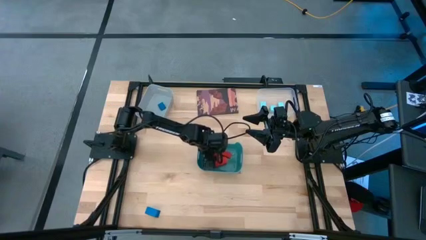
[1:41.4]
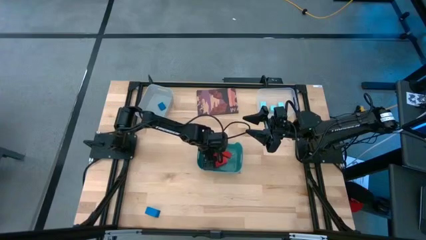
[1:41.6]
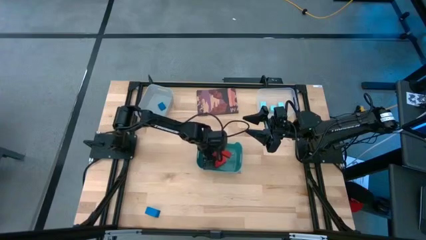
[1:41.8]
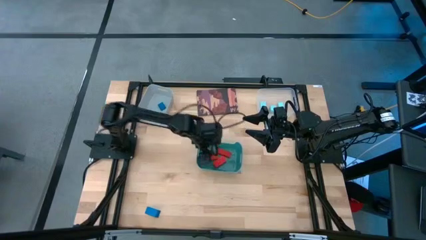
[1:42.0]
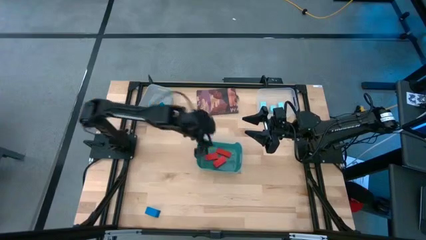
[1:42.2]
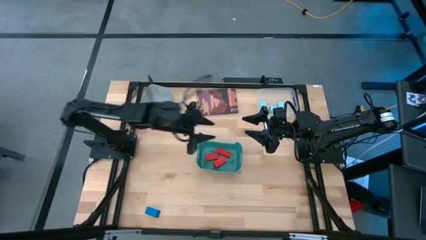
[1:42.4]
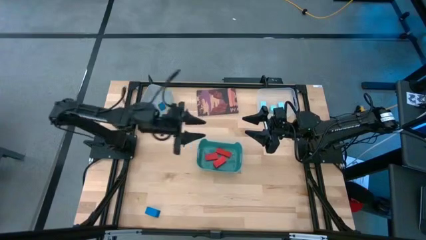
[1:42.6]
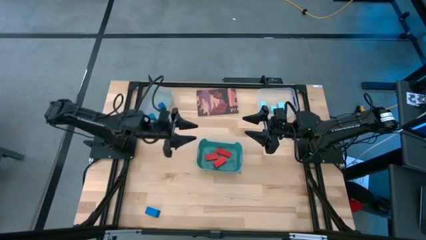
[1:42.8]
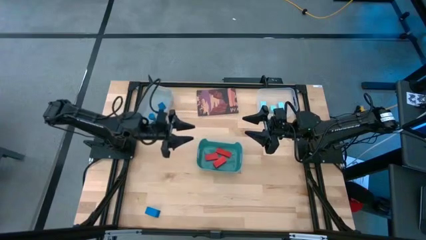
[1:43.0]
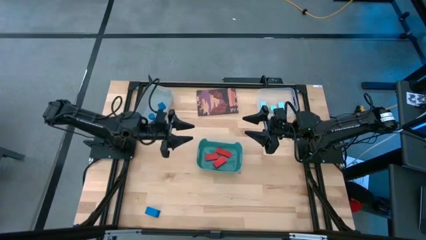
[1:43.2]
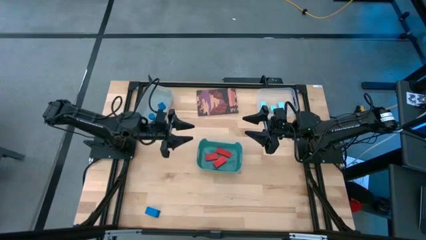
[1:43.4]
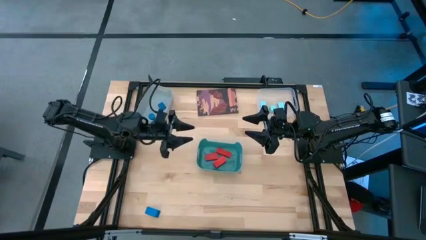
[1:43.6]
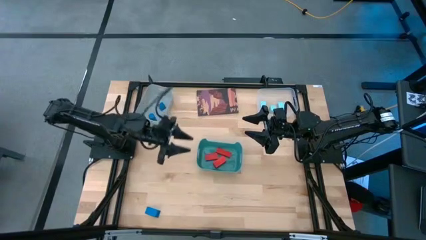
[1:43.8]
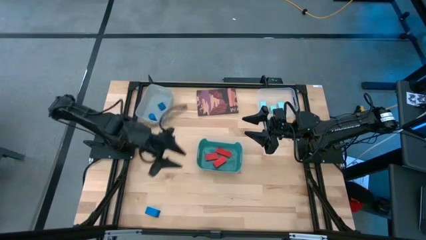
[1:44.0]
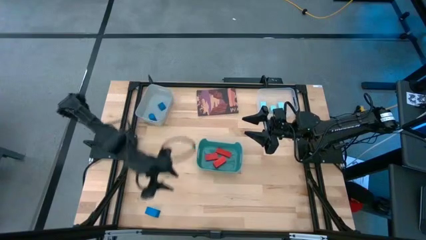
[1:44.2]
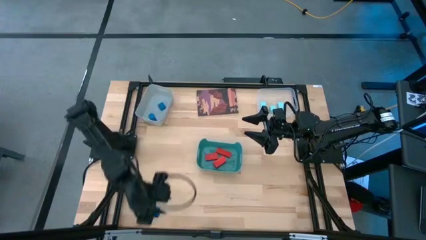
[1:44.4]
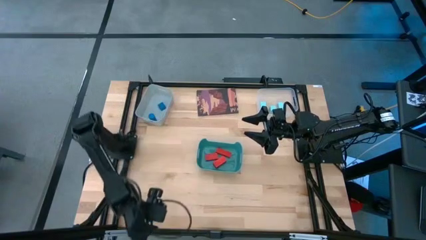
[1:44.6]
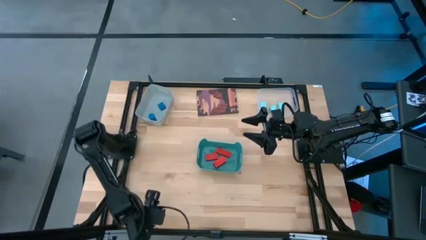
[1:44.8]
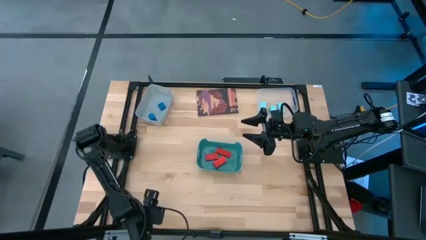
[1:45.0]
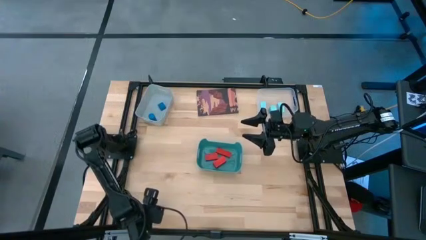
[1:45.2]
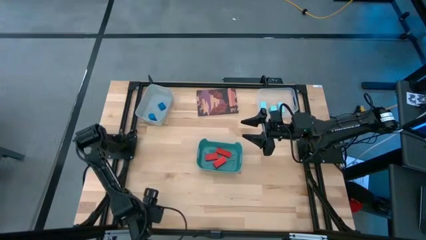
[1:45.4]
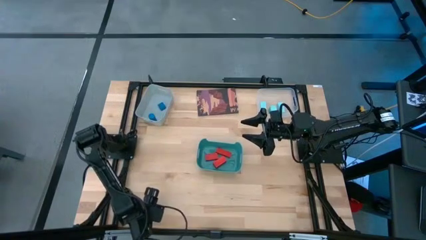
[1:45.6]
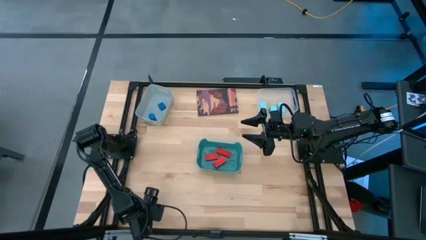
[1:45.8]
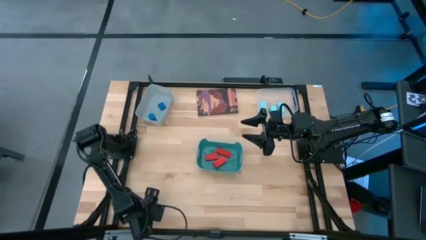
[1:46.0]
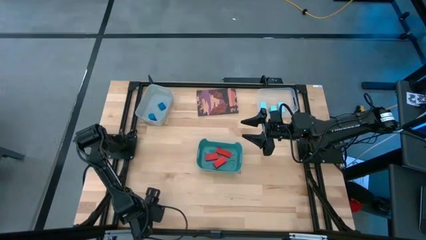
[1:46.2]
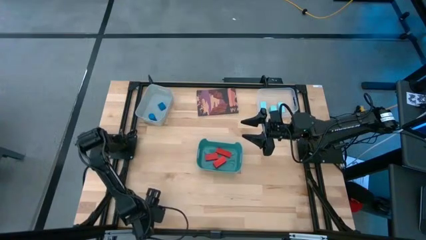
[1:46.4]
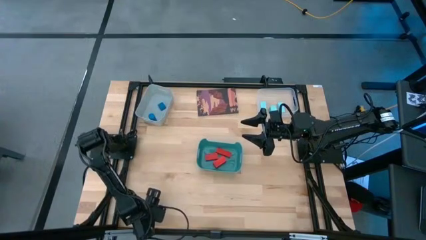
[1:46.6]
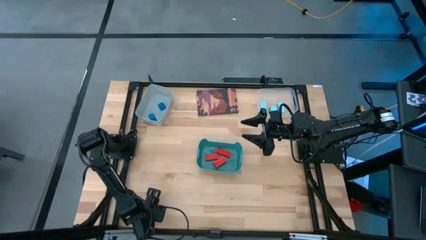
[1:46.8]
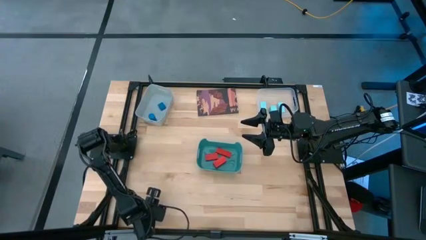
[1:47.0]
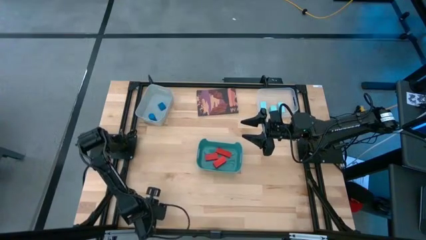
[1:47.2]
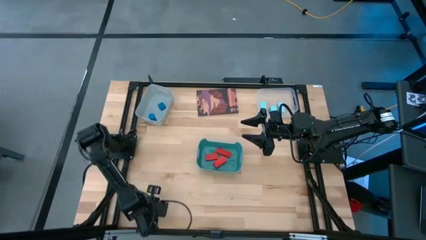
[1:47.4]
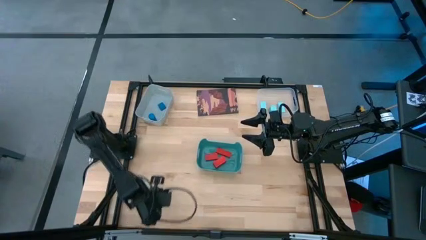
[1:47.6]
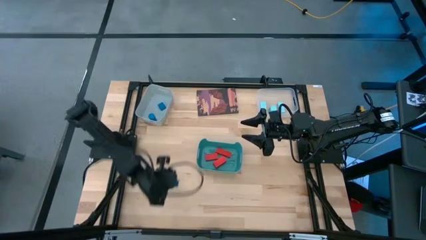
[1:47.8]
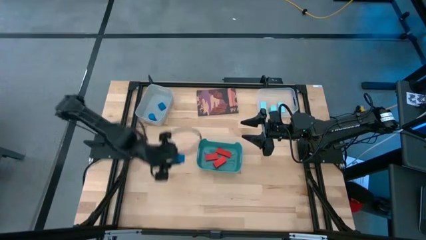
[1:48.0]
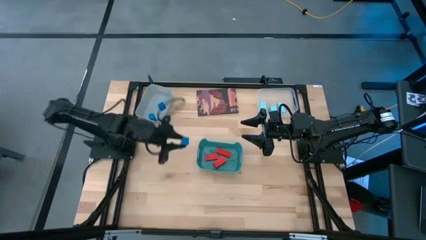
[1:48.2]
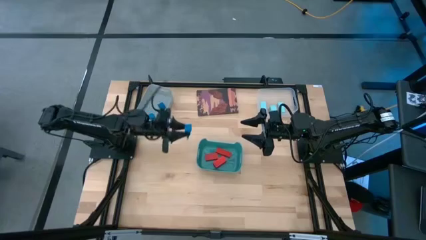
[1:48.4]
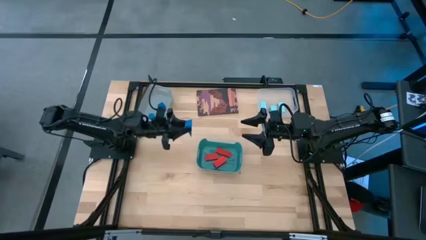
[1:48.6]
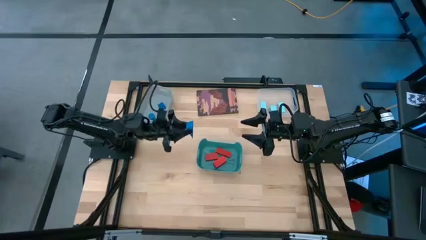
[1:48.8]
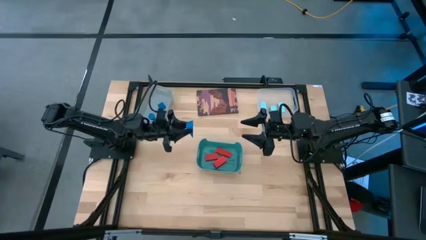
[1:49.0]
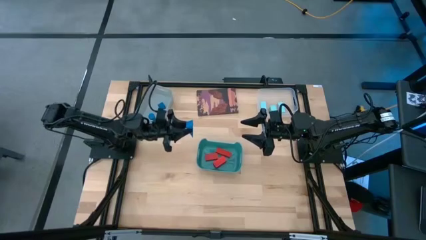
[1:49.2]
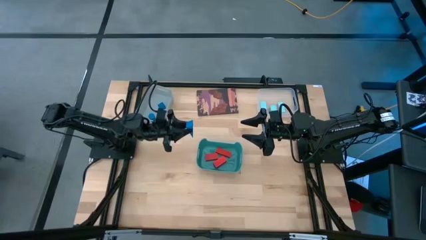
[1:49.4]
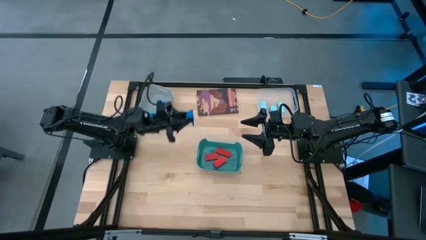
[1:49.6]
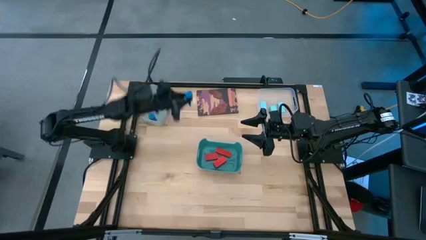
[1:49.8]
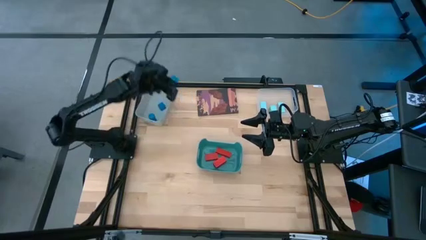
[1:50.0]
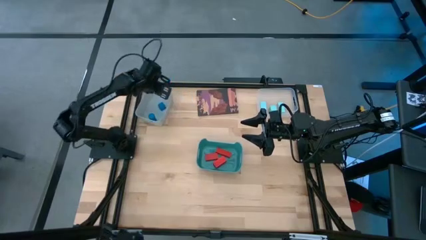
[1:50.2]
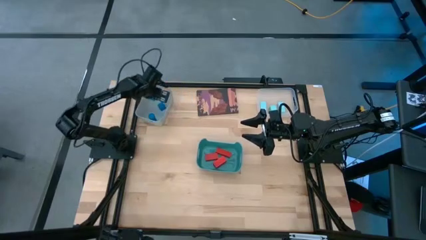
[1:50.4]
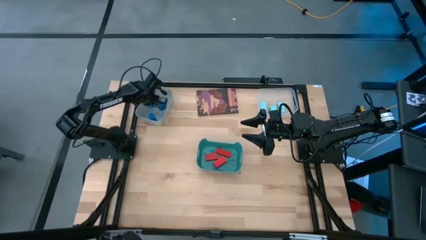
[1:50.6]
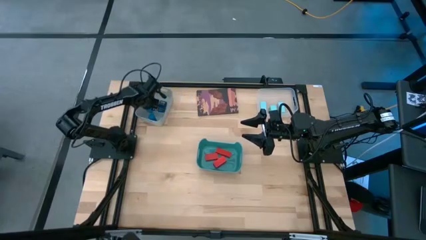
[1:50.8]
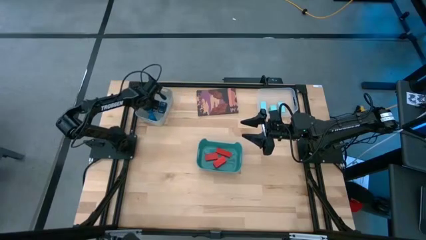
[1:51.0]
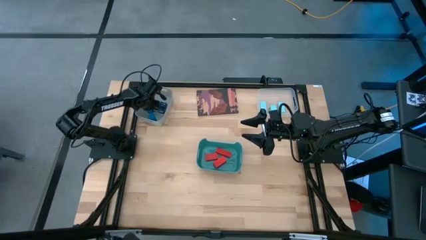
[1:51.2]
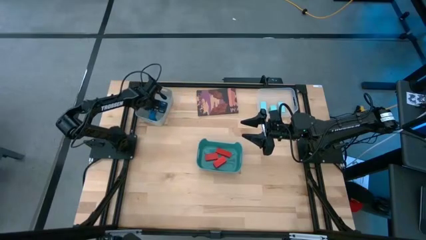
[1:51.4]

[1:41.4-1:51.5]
Task: Sort & place blocks by color
Put the triangular blue block into the white bin

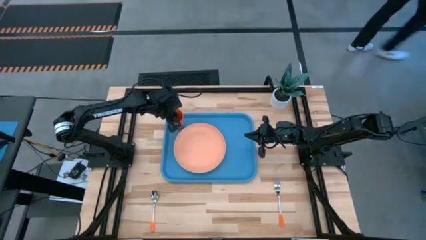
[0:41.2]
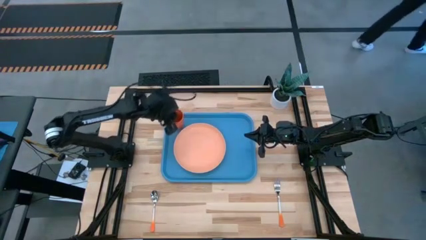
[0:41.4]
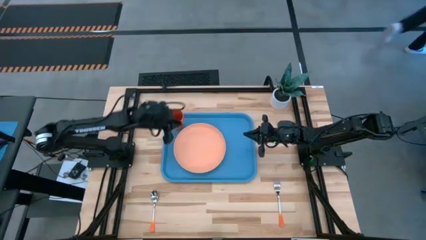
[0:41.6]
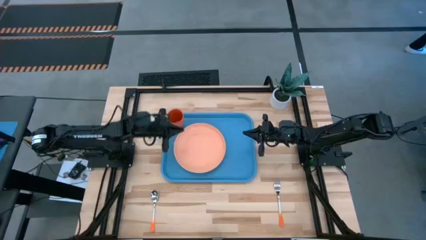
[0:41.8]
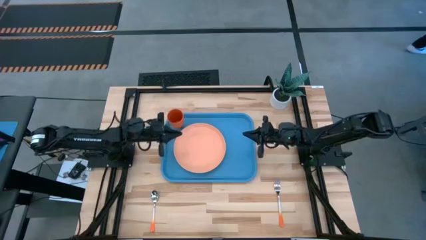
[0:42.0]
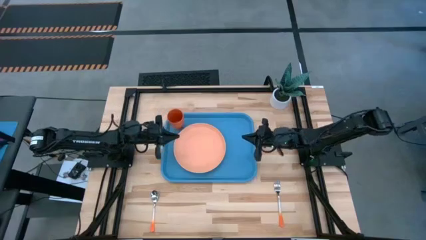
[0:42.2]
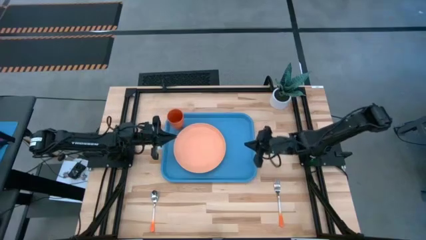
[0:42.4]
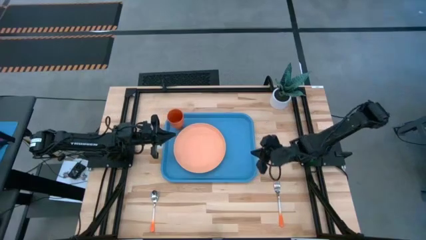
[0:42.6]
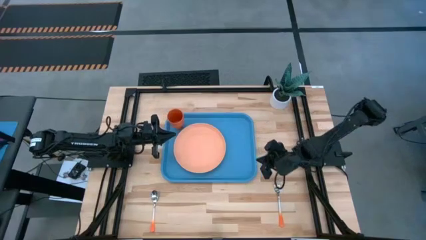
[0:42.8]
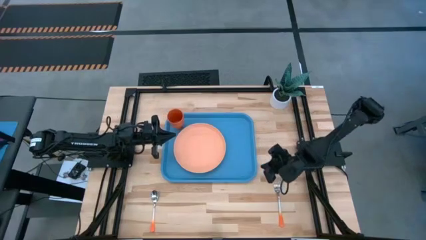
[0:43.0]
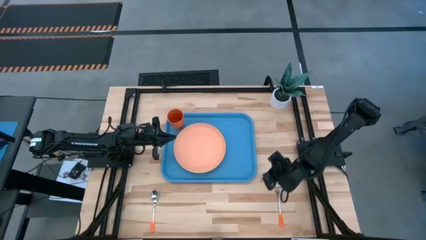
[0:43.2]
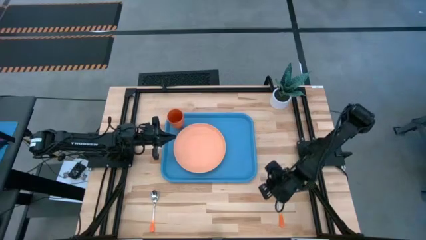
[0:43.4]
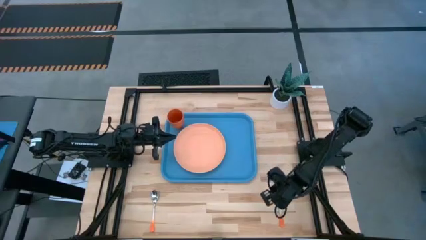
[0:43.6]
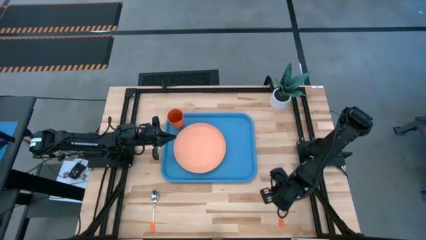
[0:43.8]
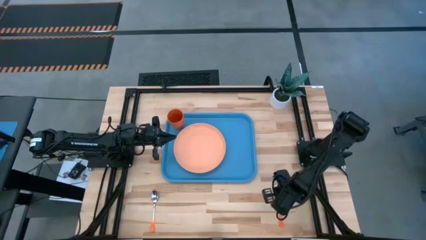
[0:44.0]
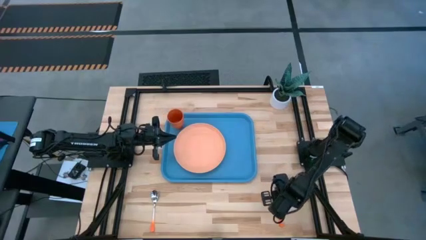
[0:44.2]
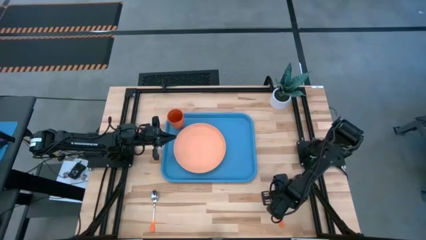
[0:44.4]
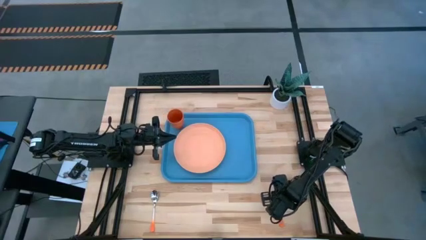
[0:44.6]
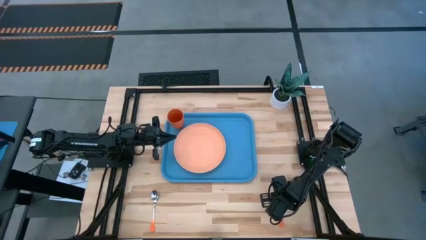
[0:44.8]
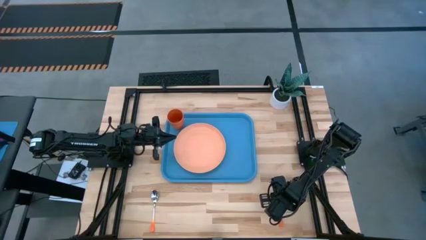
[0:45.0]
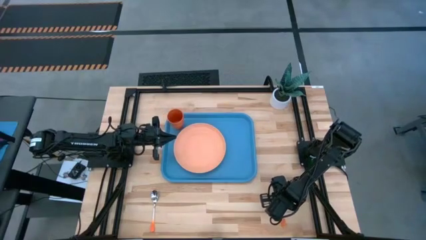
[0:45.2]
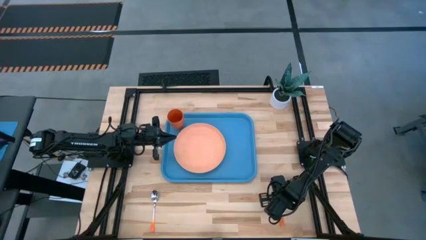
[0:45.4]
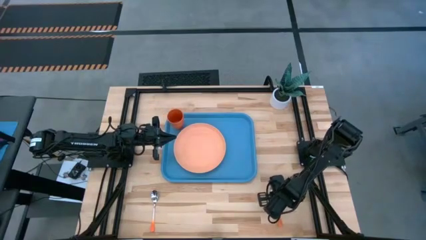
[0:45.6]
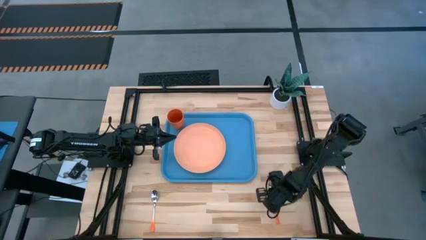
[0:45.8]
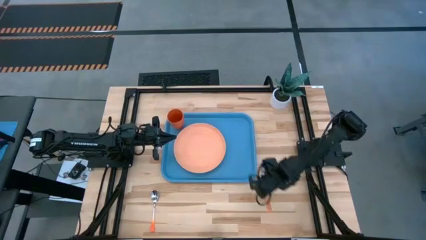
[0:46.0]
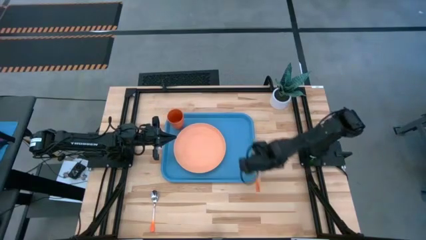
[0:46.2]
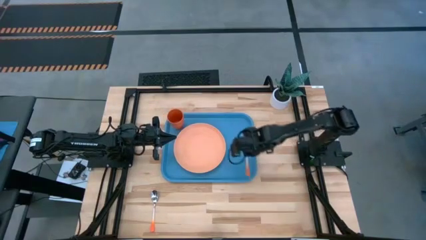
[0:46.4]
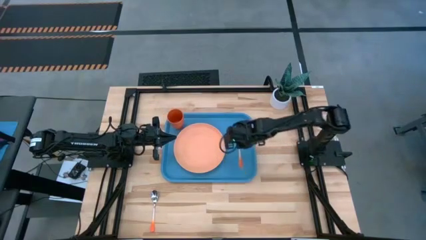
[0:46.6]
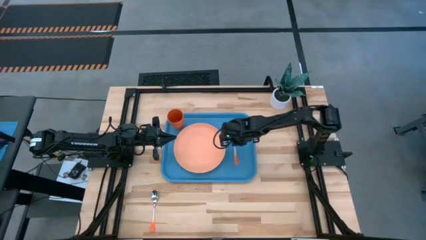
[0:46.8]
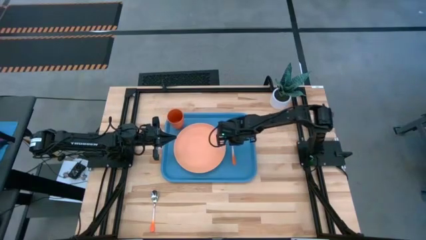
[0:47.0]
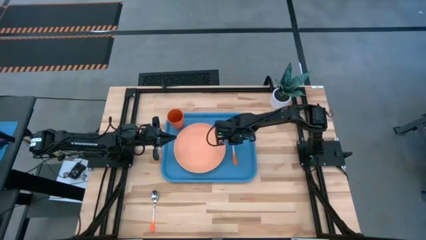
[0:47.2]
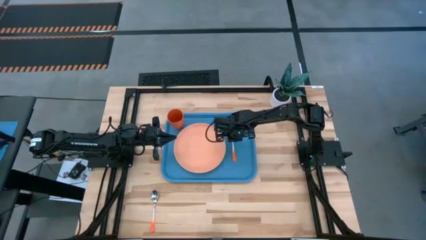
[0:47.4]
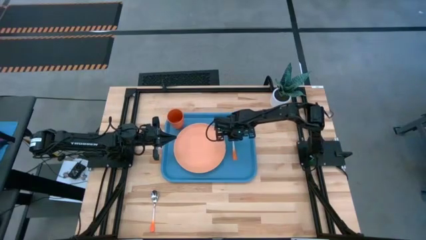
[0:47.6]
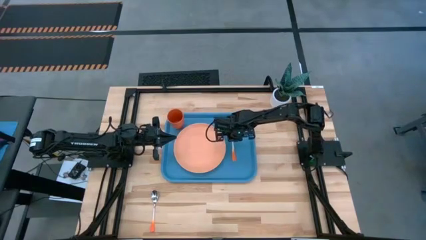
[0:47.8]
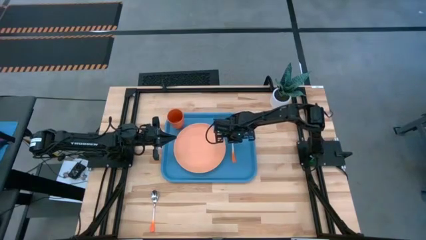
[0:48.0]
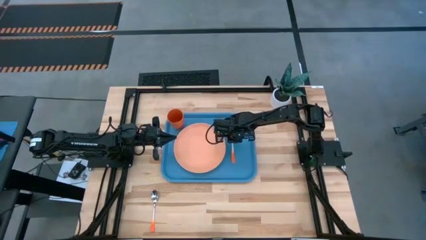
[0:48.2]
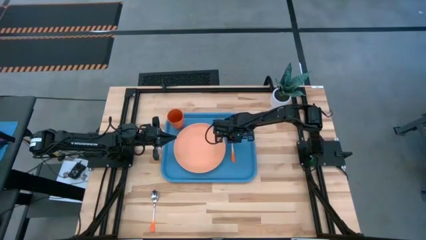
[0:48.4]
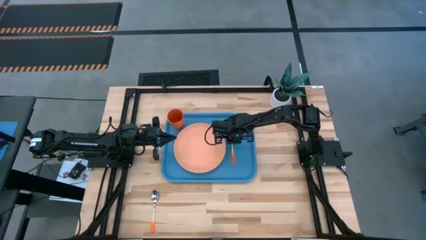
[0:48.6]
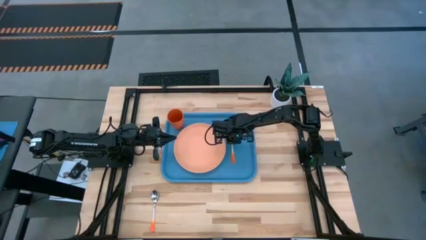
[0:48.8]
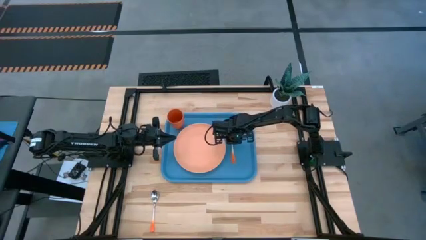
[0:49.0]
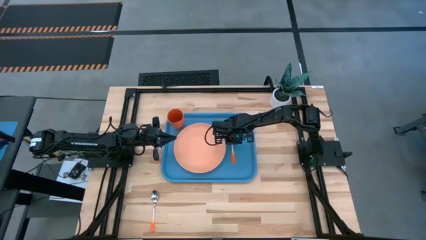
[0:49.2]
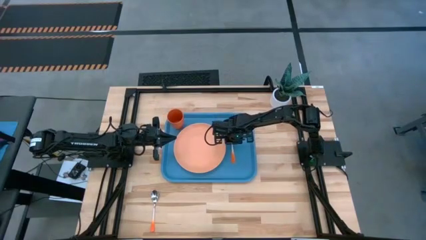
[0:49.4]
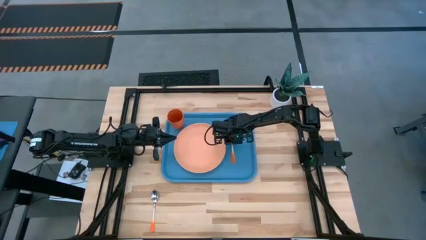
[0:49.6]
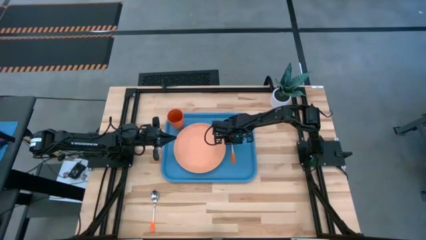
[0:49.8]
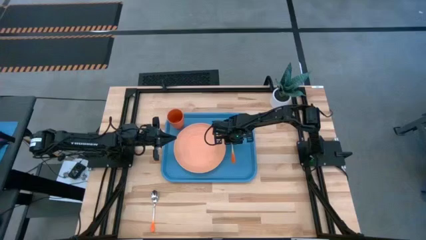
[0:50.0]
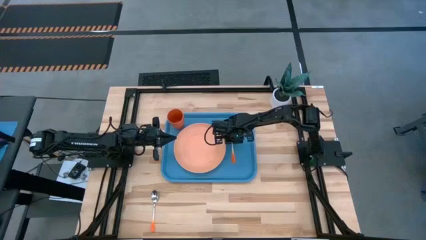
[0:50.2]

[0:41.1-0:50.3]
Task: Pick and place plate/cup/fork/spoon on tray
Put the orange fork on the blue tray to the right of the orange plate
